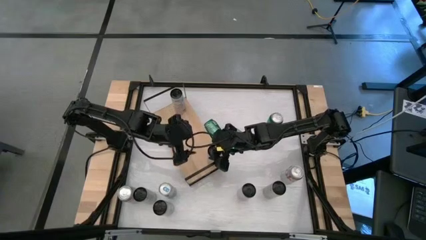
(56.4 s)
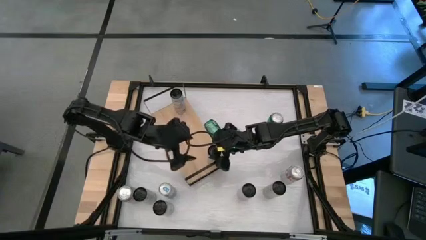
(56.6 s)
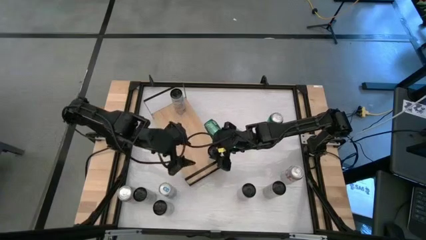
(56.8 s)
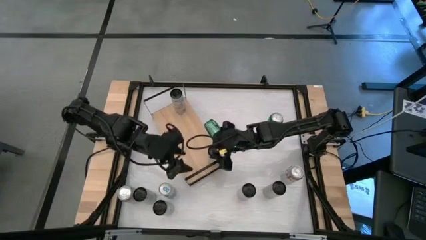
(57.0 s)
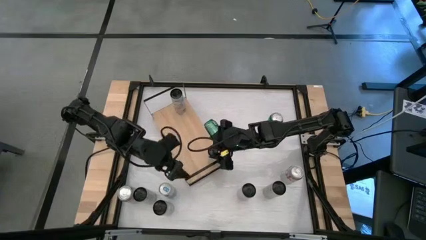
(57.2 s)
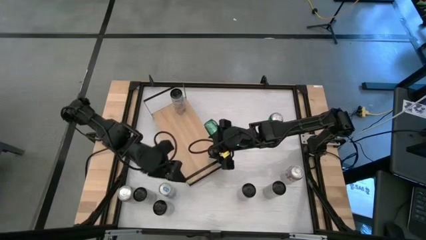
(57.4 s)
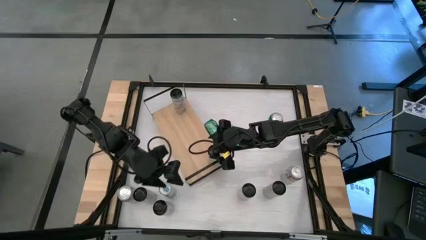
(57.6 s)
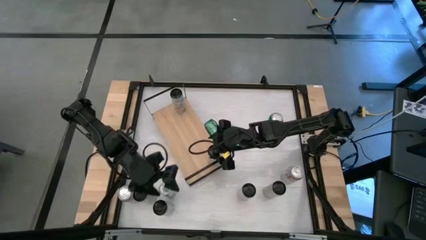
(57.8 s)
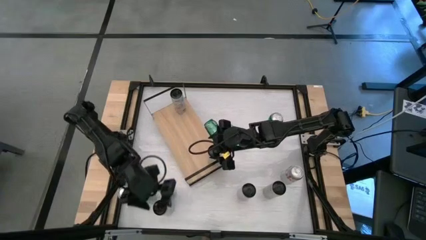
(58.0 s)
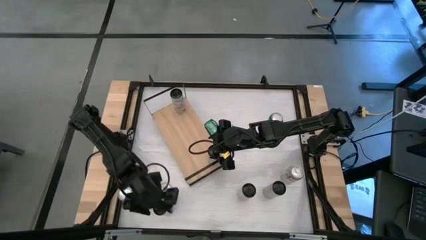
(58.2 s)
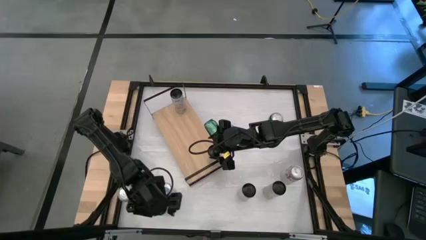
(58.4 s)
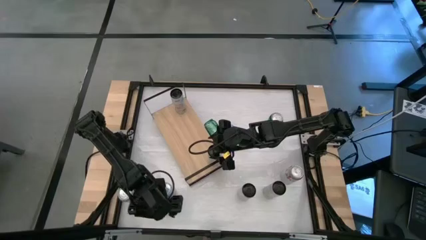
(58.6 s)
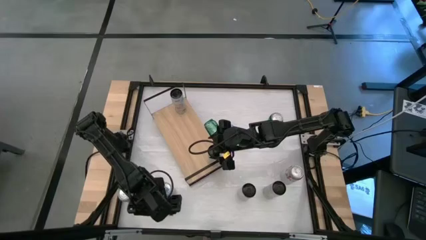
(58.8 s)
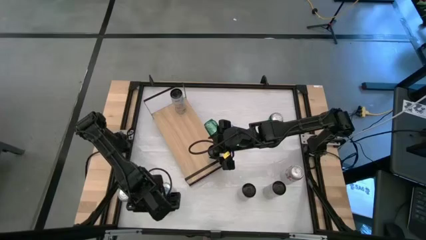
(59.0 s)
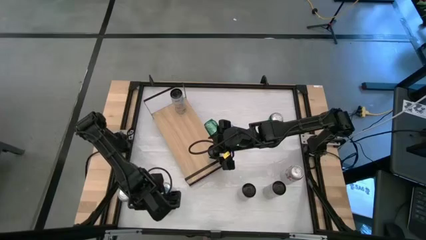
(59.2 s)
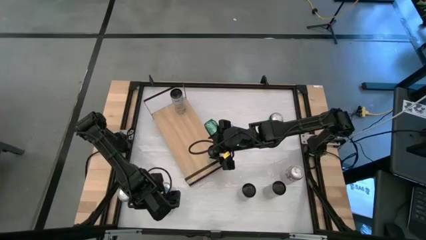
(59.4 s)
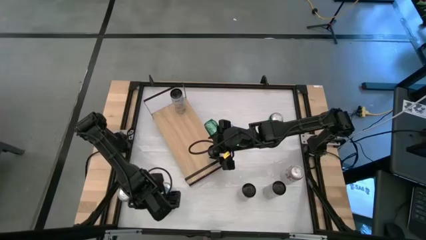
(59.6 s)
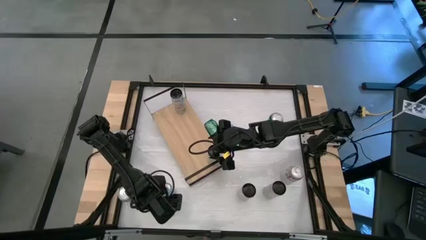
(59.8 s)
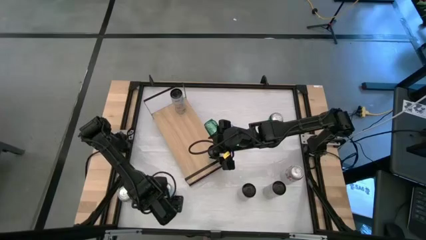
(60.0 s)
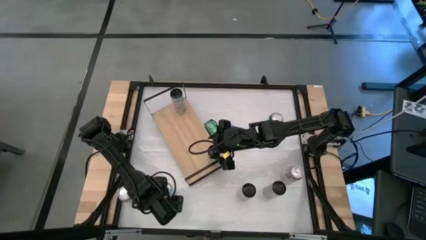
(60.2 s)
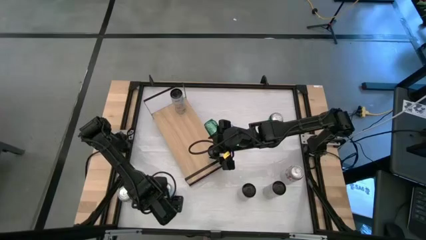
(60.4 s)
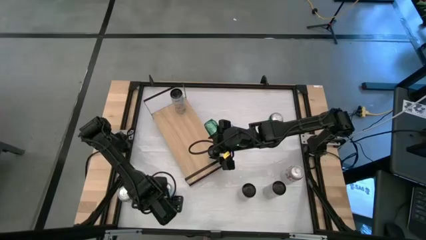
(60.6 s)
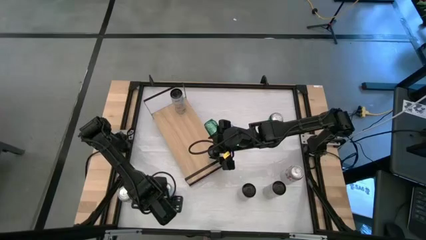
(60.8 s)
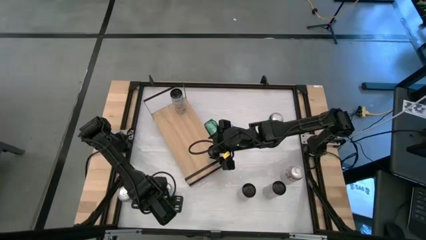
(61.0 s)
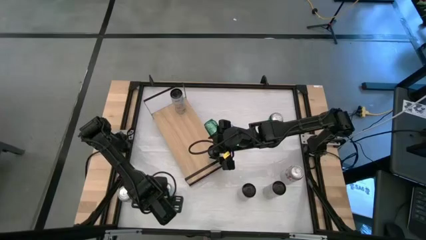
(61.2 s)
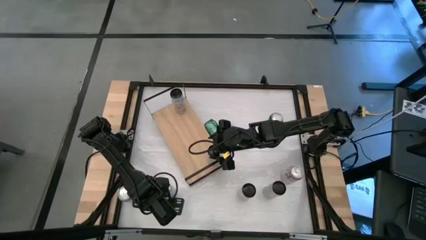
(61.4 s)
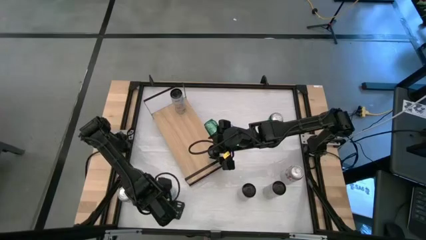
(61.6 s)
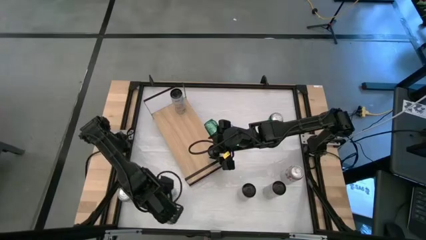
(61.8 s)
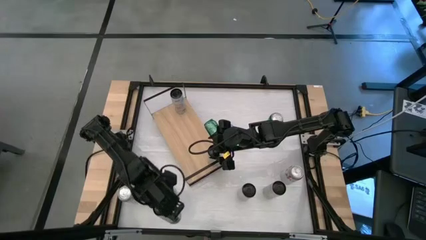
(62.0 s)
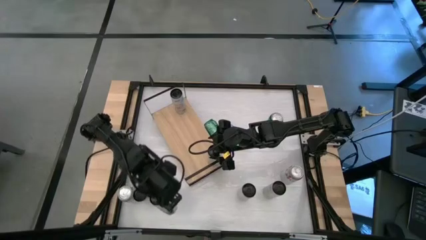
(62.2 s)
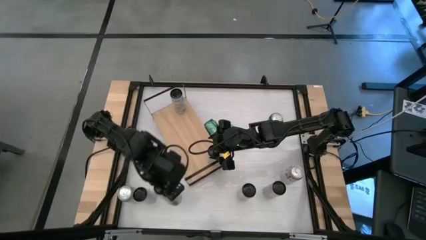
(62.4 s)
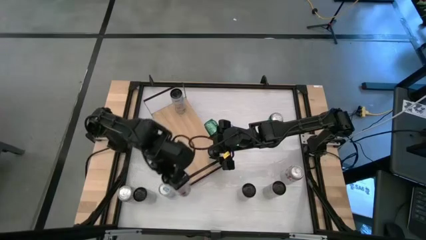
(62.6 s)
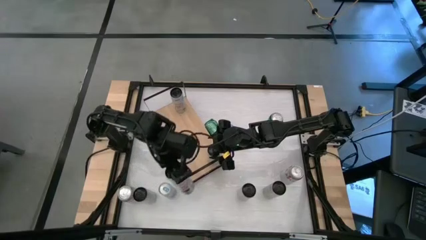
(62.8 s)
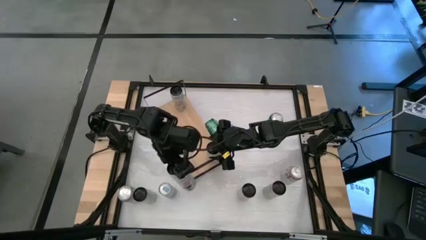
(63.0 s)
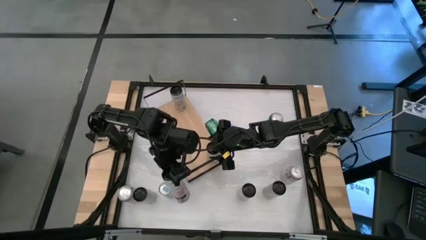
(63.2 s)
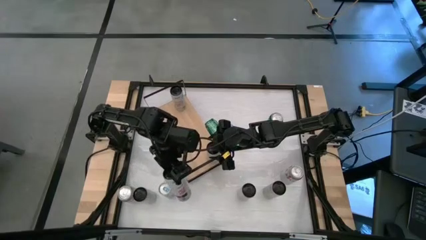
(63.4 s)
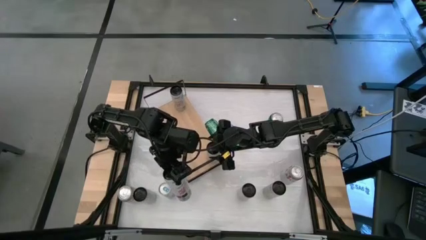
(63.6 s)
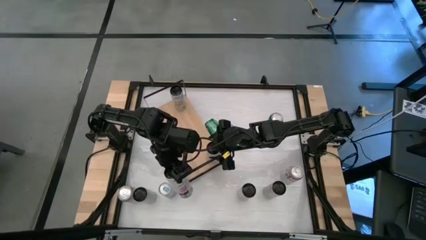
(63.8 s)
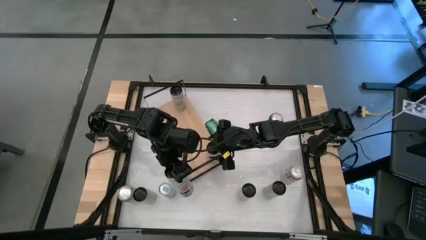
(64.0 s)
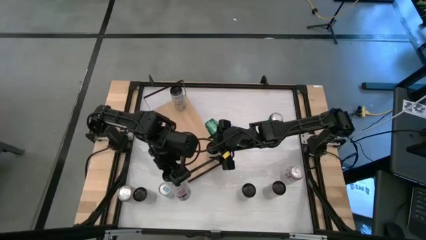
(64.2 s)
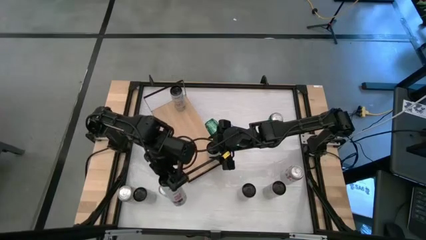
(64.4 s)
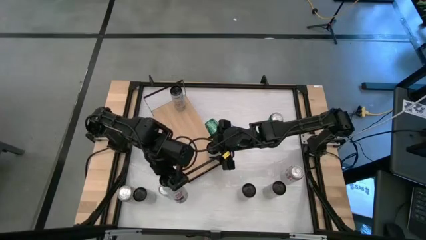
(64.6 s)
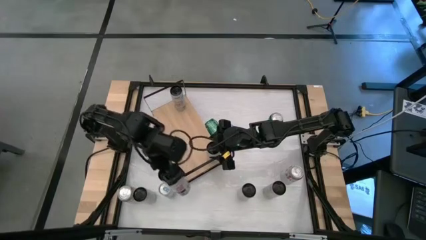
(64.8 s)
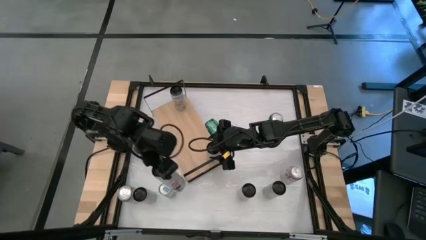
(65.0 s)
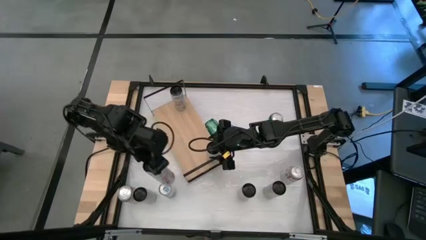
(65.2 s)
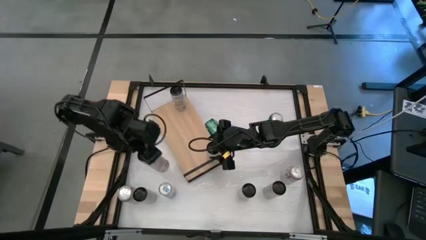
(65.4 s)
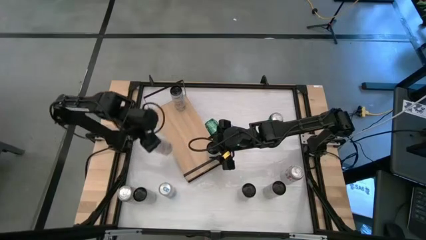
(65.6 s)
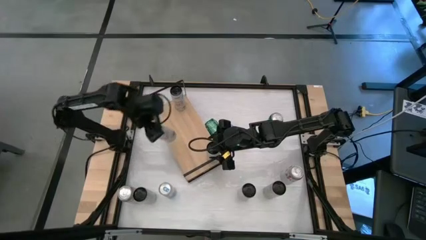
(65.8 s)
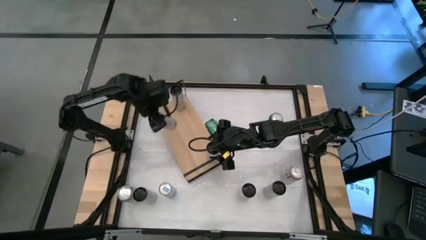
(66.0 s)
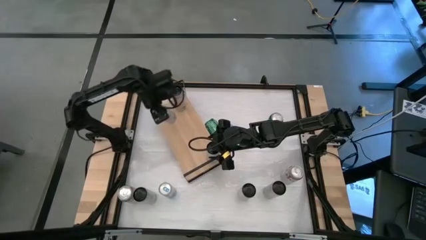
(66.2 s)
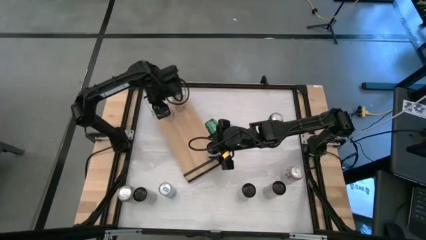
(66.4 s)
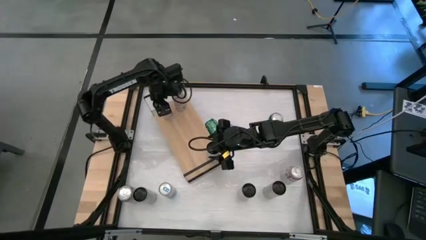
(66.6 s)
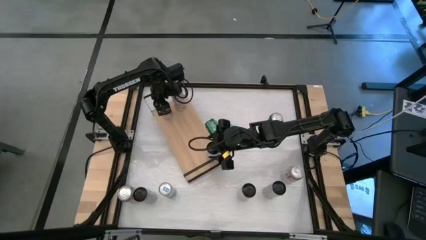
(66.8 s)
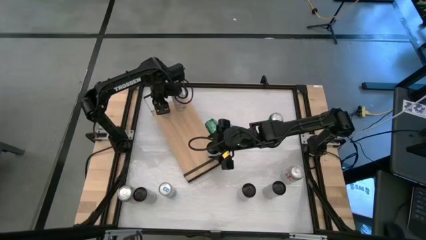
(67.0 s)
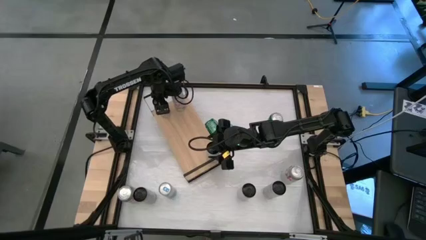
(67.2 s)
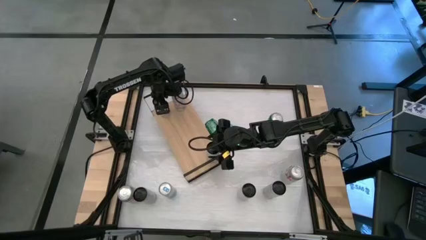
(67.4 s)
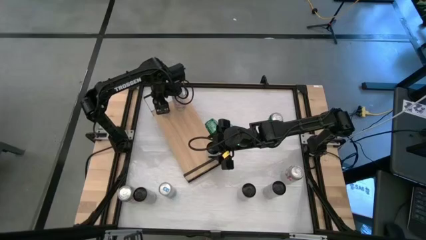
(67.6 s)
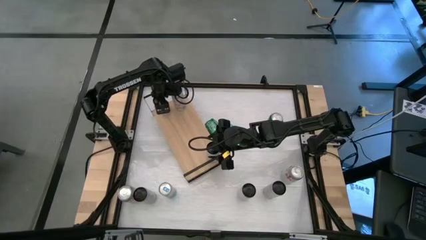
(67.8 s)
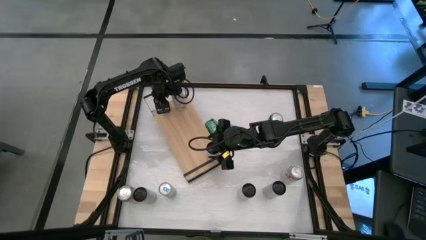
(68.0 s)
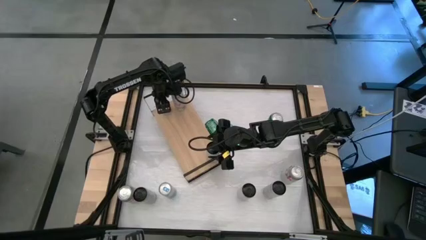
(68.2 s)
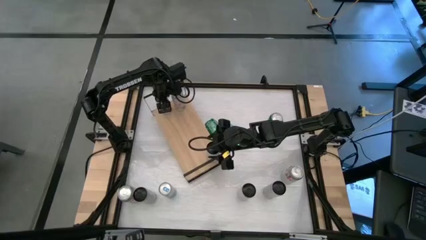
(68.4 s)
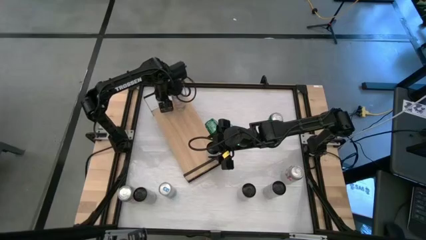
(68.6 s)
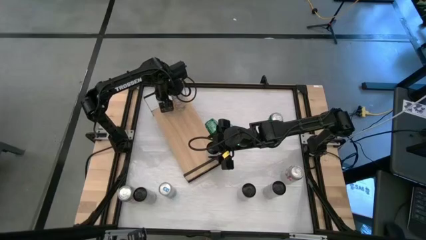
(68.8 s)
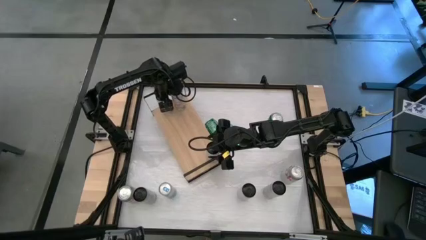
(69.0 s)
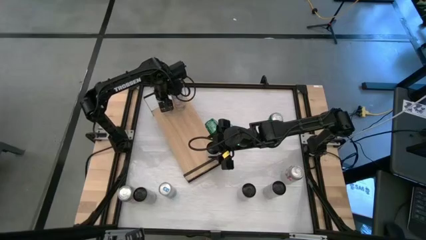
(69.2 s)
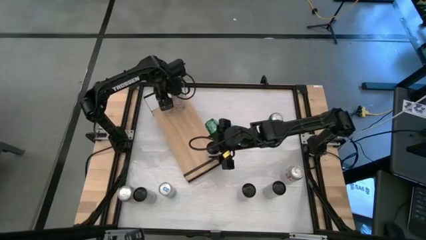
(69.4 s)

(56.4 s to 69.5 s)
Task: Place canned beverage on shelf
Put the white pink soda can on the shelf aligned with the other white pink soda can
